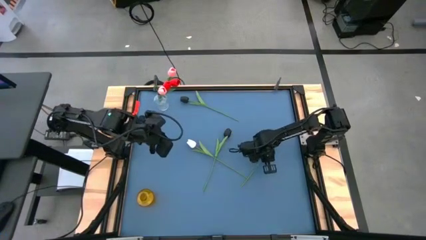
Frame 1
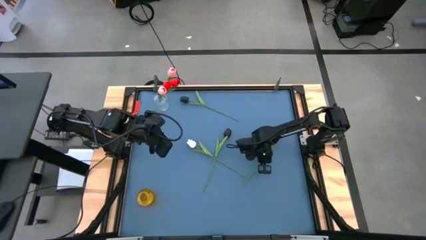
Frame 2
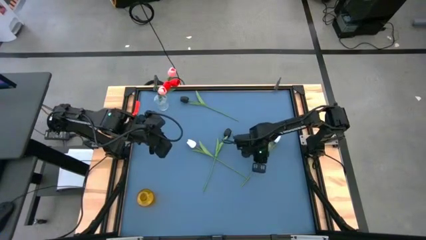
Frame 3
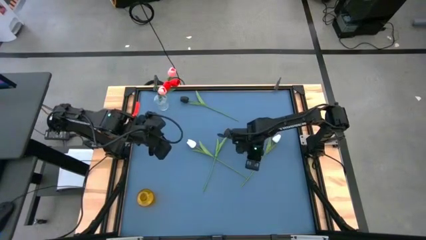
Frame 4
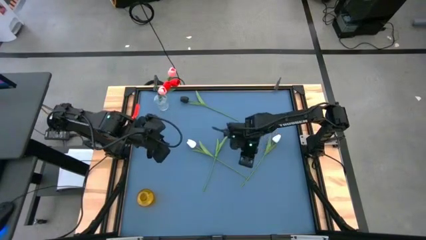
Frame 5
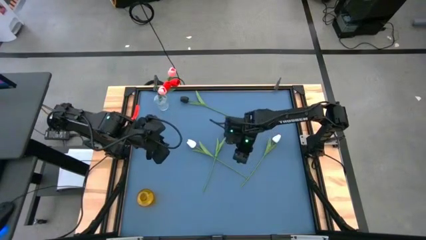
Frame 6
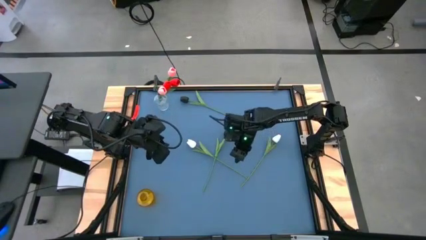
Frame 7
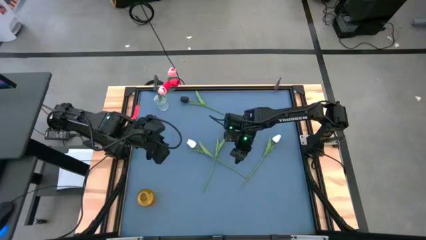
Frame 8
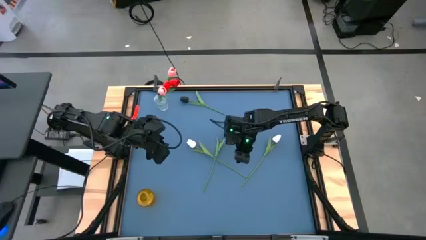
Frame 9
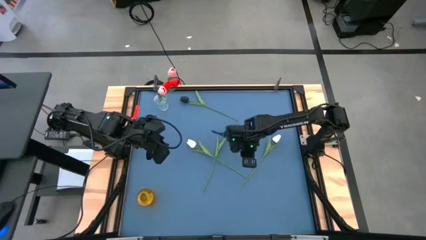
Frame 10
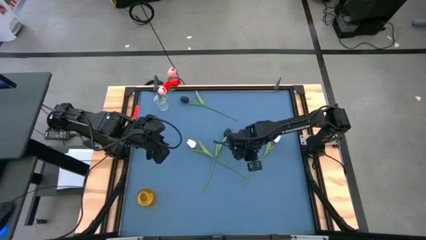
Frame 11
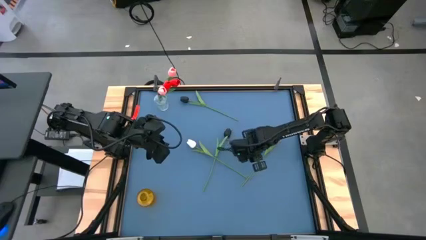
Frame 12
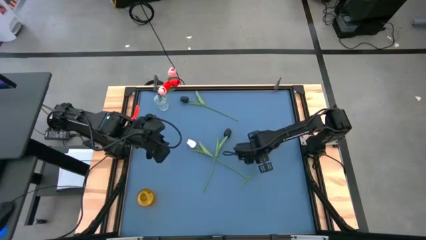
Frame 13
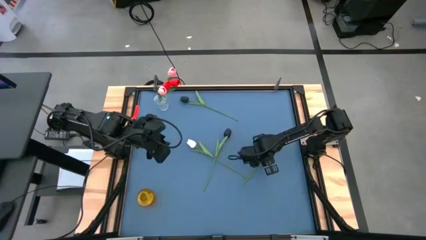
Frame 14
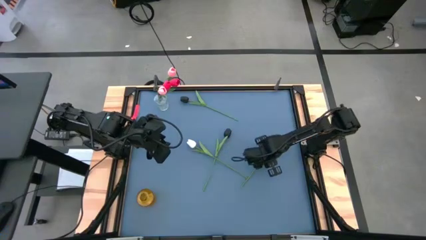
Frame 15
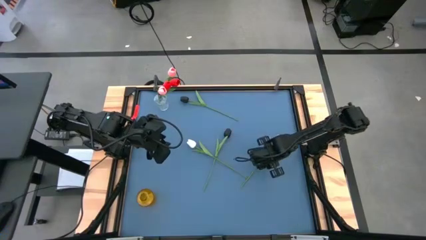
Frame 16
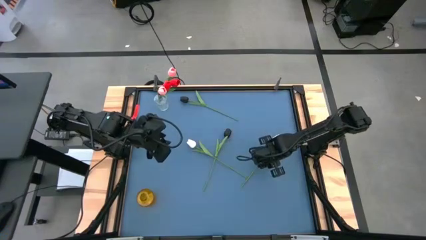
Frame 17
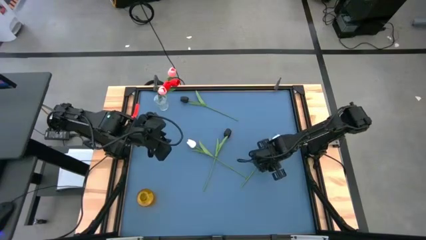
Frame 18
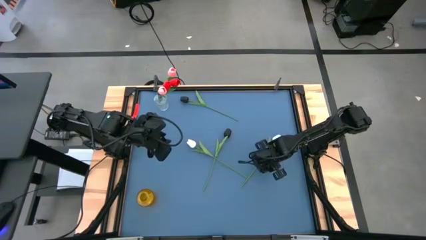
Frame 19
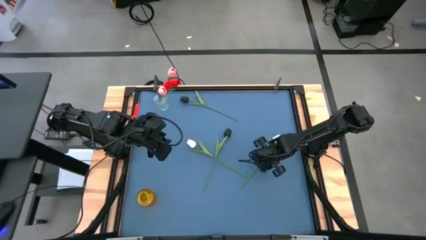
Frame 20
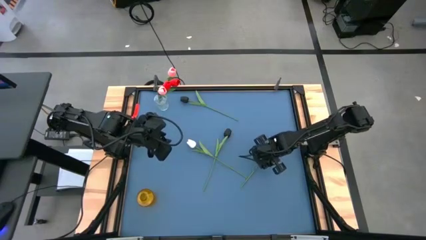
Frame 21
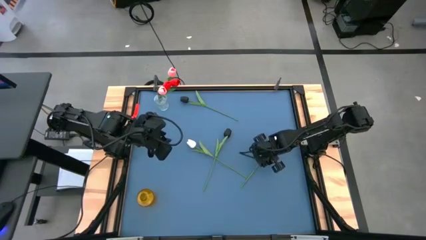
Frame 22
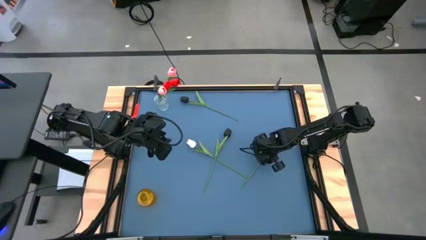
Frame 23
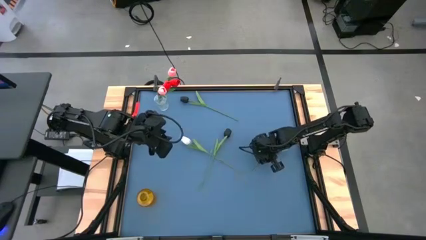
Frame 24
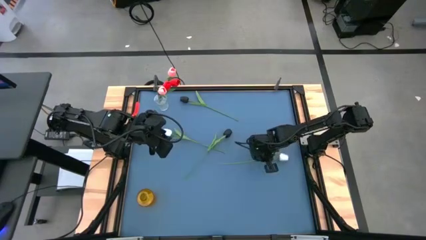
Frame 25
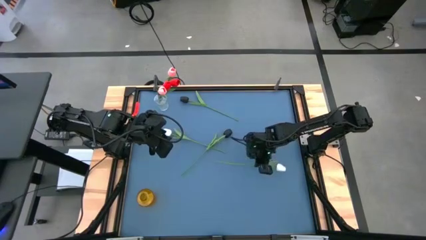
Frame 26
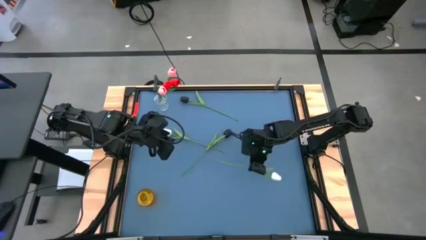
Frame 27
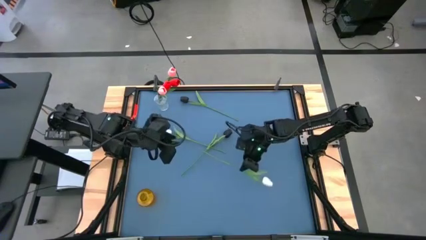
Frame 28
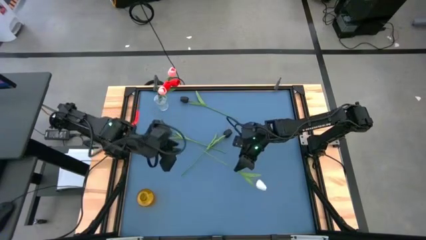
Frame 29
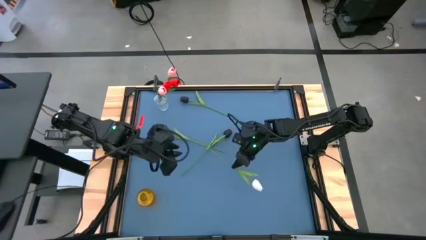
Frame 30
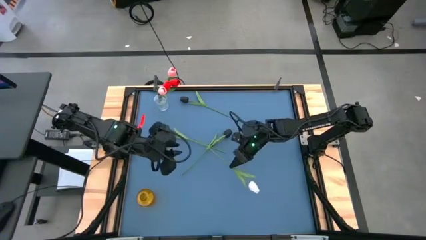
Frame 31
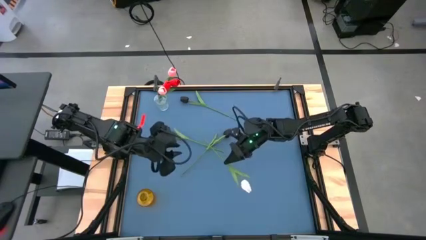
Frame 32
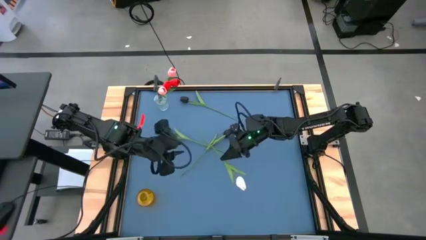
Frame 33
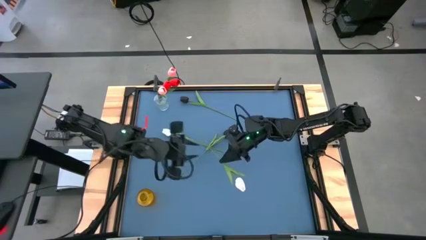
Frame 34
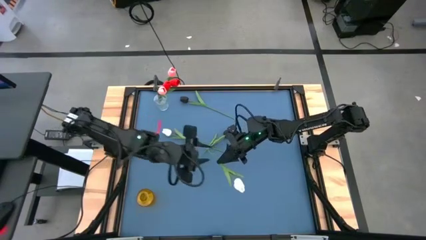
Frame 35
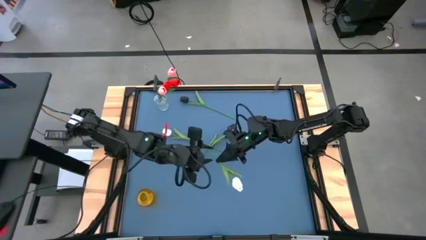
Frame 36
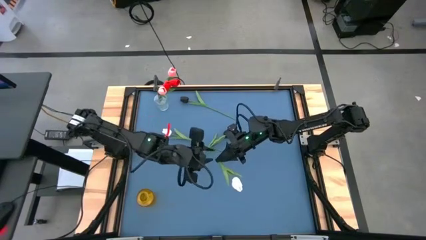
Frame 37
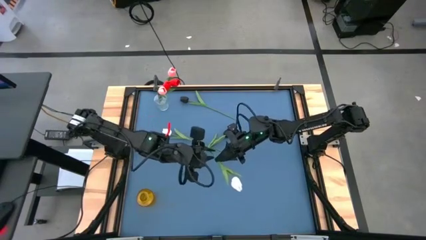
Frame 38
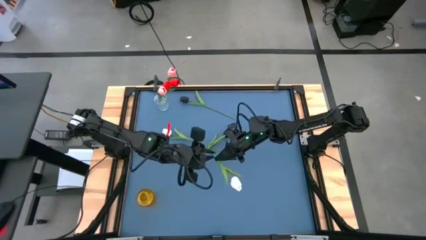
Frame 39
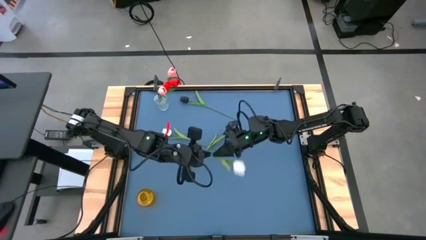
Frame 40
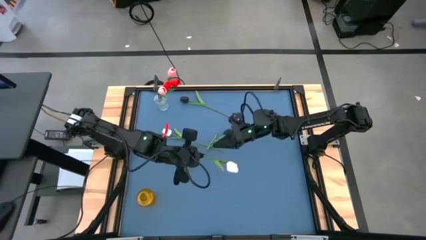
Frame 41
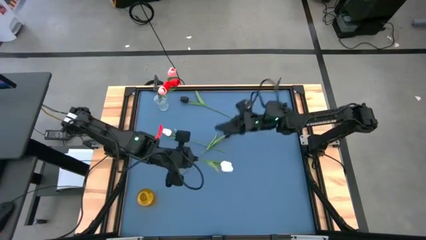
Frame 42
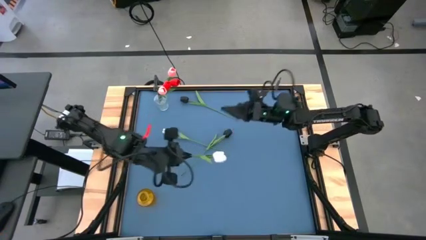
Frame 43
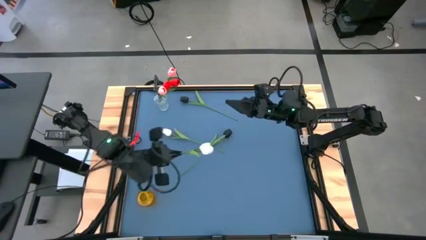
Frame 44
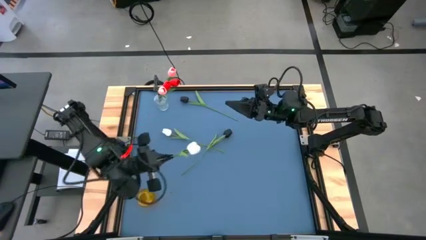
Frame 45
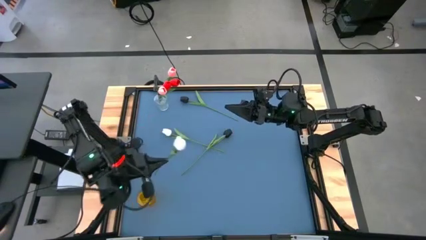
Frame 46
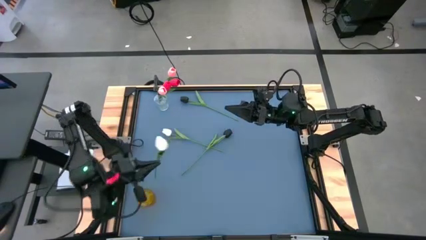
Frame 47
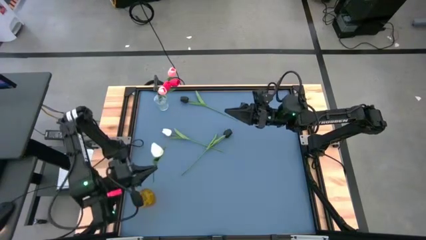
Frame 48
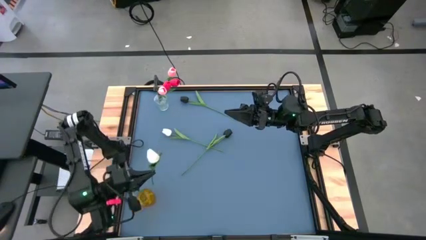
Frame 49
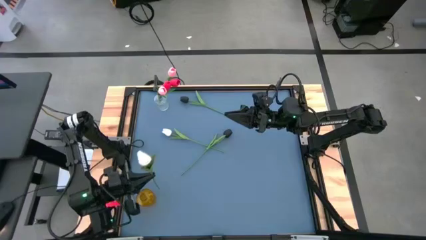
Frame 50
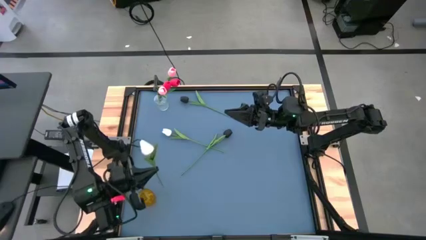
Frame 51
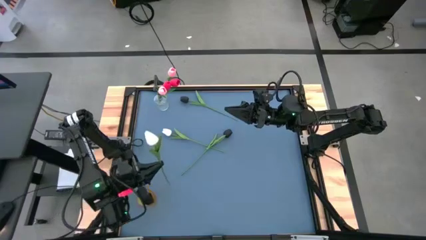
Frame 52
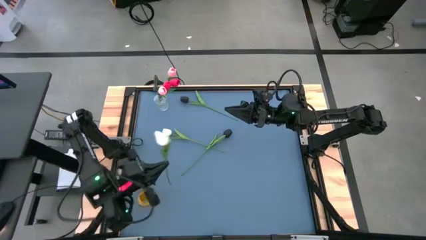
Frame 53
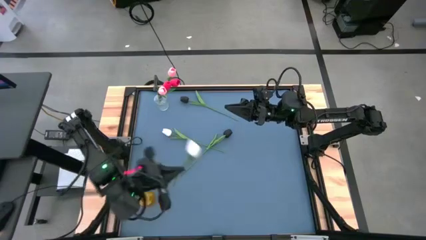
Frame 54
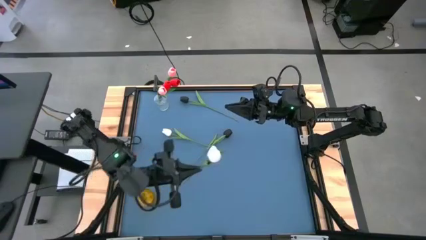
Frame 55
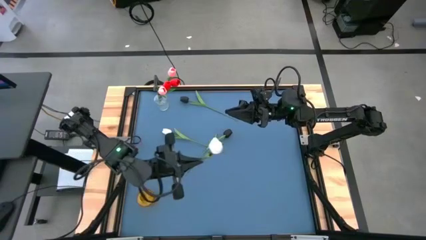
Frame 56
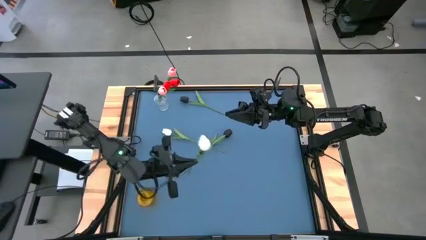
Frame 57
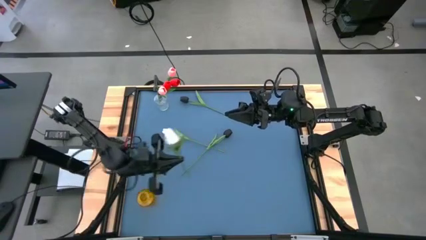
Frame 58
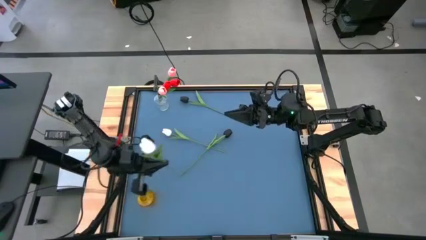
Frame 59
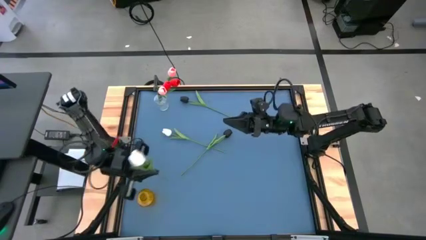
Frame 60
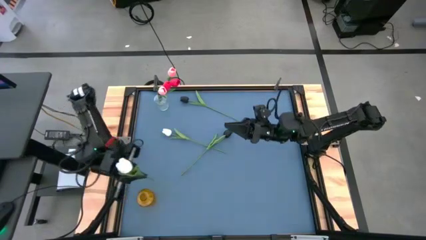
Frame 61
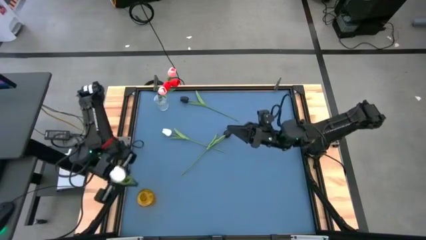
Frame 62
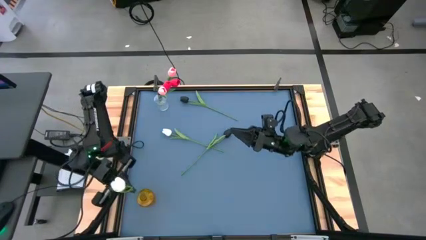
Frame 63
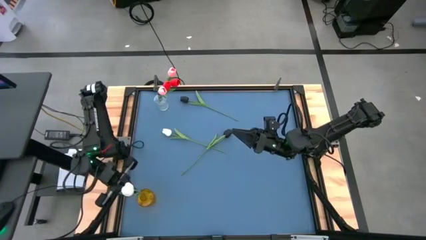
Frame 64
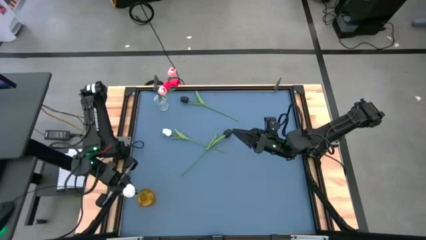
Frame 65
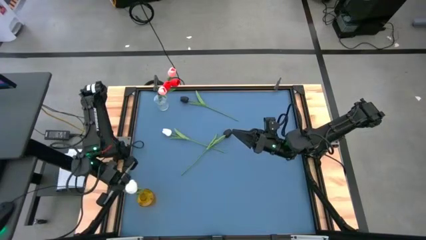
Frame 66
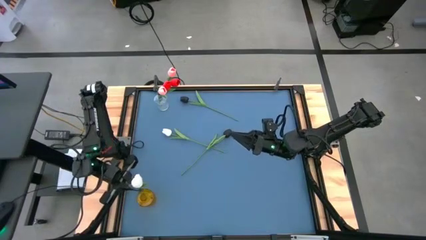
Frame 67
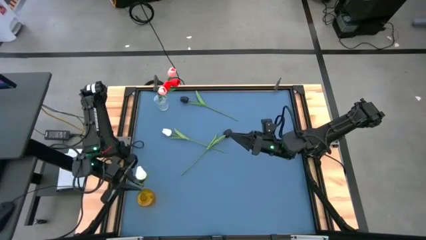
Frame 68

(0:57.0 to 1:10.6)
Task: Sort flowers into vase by color
Put the right white flower into the yellow vase
